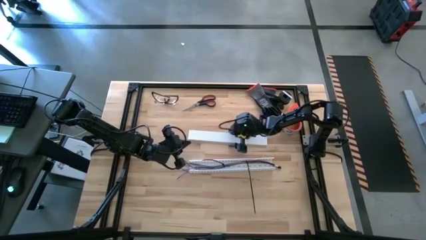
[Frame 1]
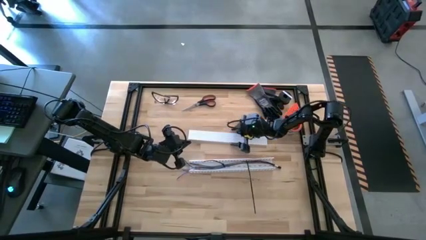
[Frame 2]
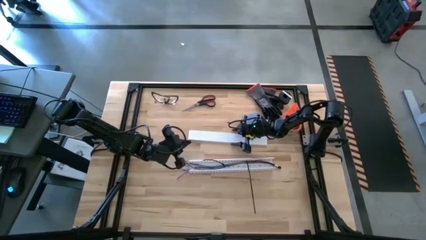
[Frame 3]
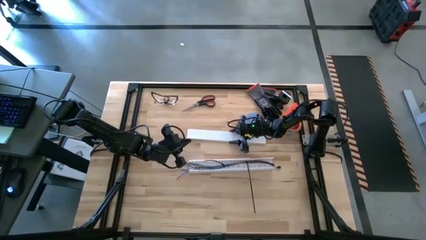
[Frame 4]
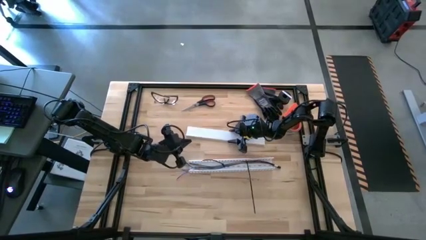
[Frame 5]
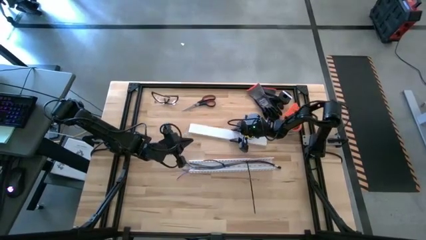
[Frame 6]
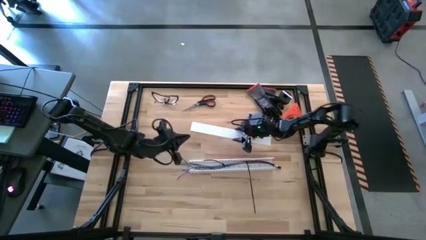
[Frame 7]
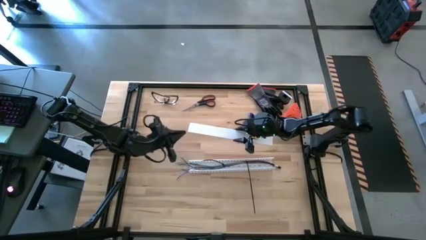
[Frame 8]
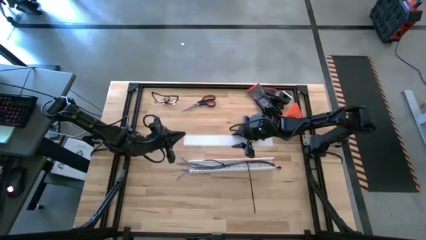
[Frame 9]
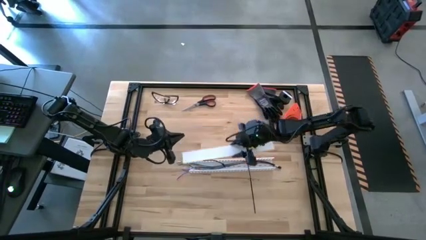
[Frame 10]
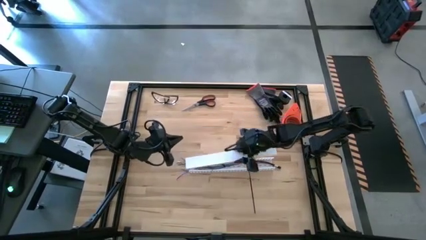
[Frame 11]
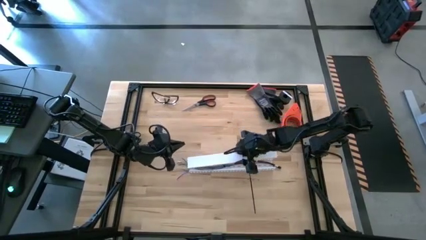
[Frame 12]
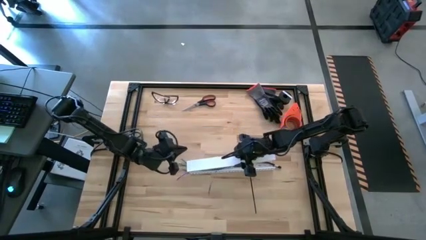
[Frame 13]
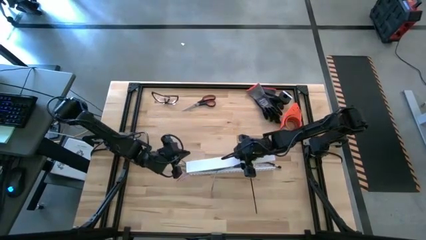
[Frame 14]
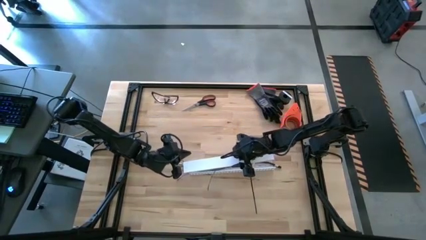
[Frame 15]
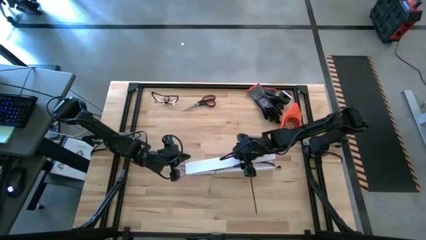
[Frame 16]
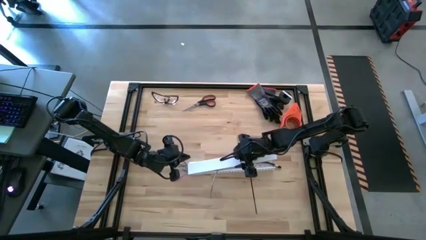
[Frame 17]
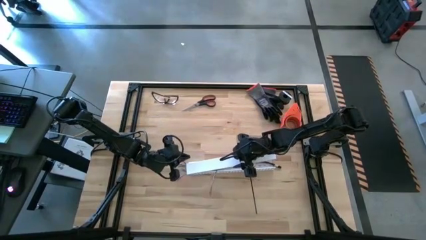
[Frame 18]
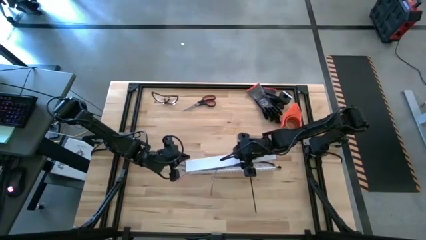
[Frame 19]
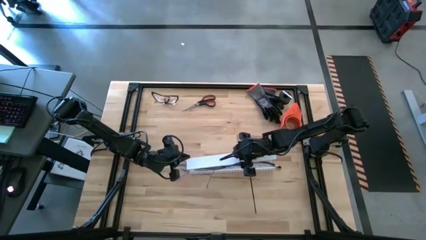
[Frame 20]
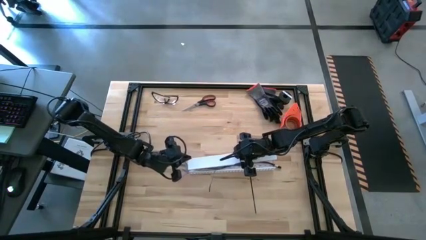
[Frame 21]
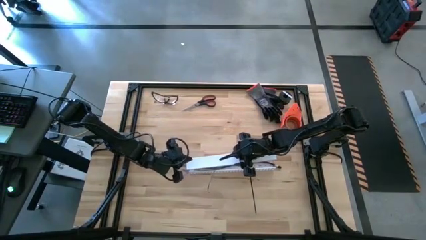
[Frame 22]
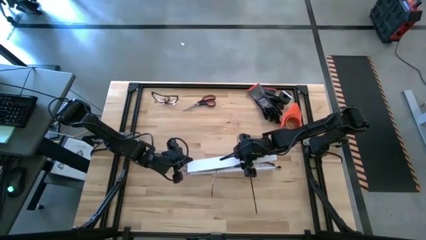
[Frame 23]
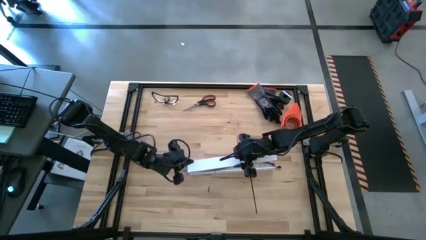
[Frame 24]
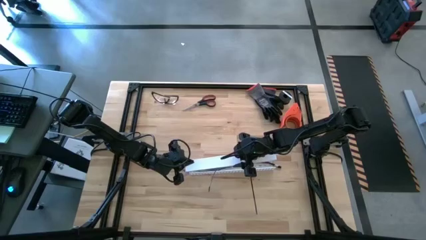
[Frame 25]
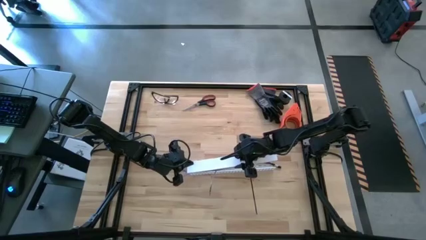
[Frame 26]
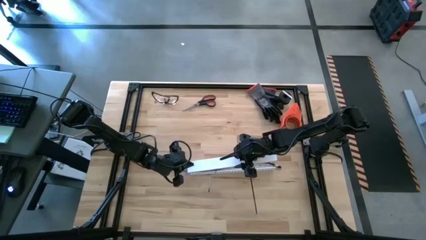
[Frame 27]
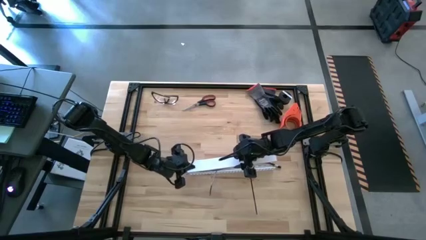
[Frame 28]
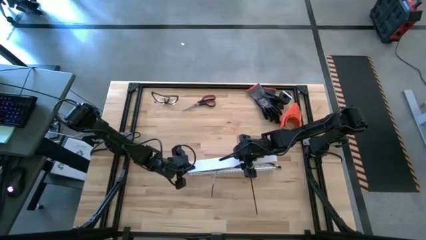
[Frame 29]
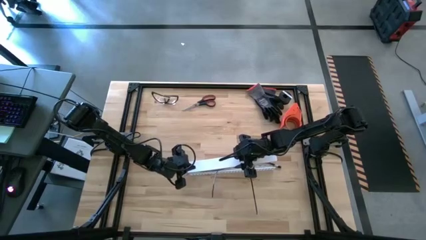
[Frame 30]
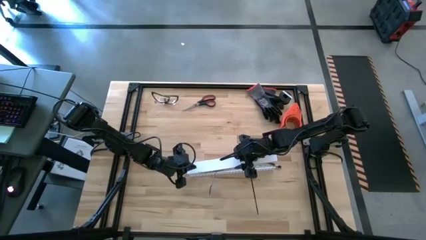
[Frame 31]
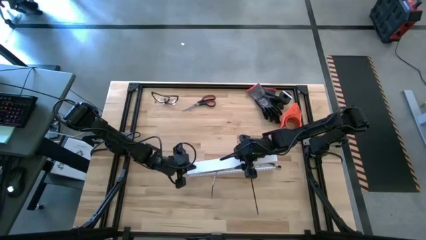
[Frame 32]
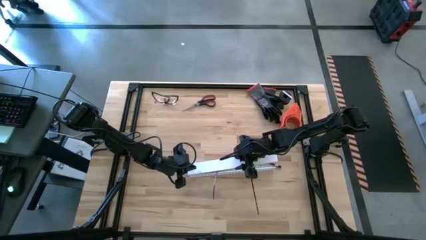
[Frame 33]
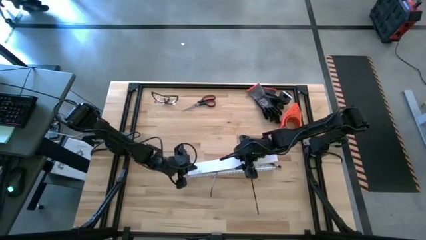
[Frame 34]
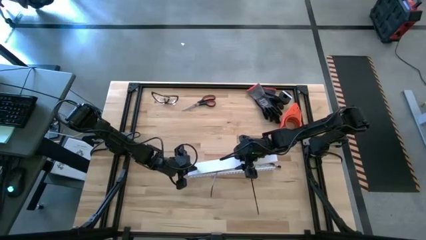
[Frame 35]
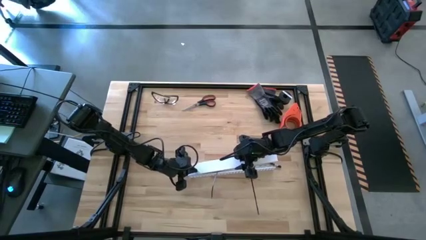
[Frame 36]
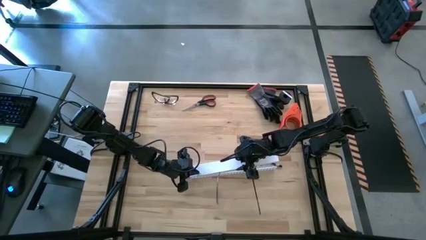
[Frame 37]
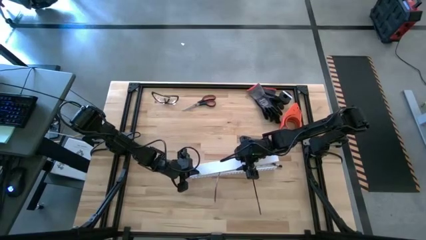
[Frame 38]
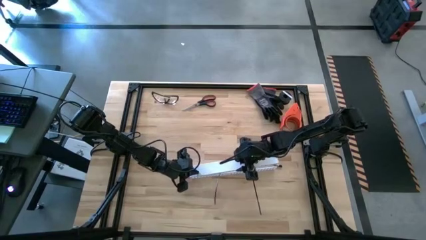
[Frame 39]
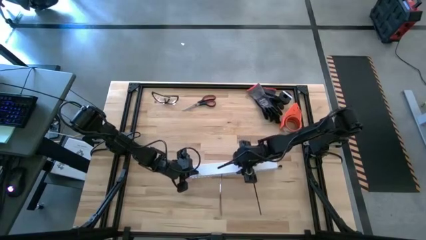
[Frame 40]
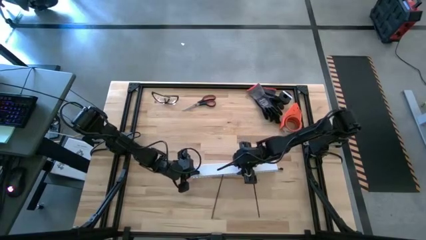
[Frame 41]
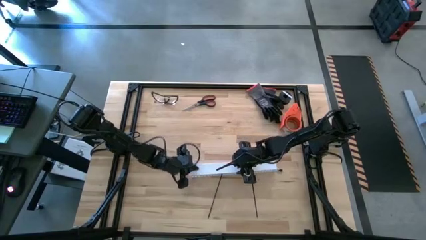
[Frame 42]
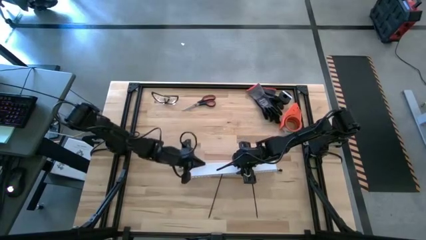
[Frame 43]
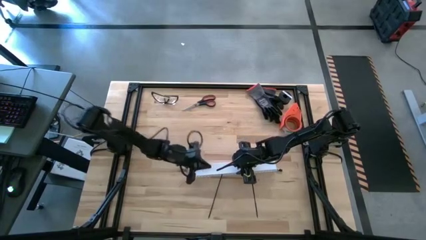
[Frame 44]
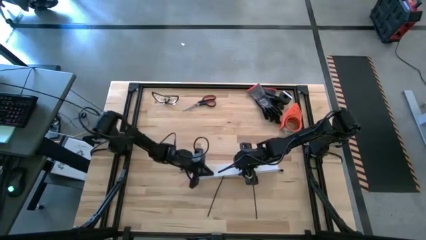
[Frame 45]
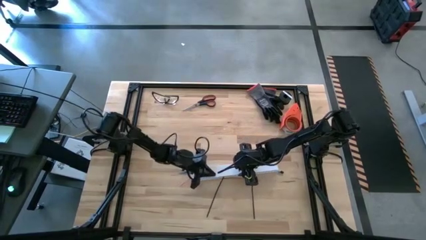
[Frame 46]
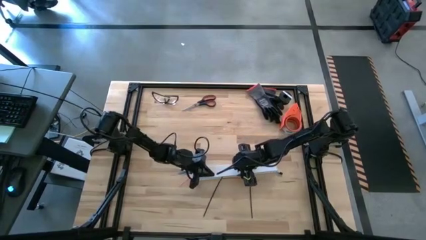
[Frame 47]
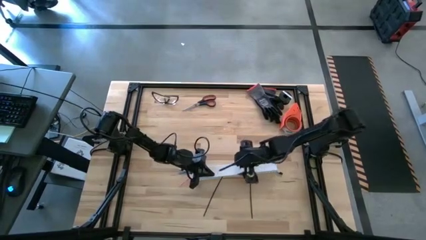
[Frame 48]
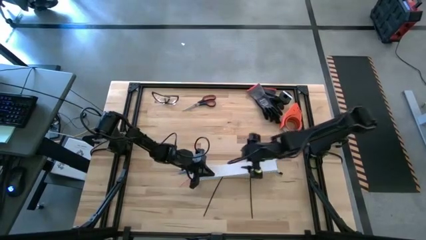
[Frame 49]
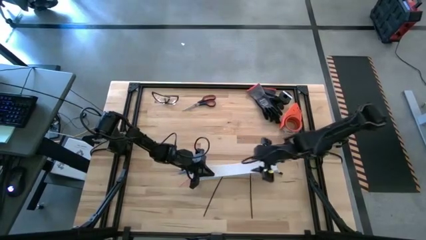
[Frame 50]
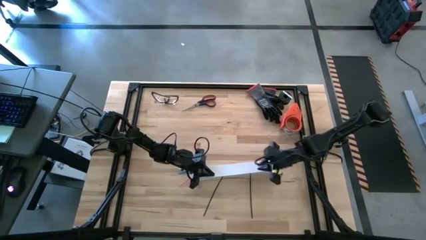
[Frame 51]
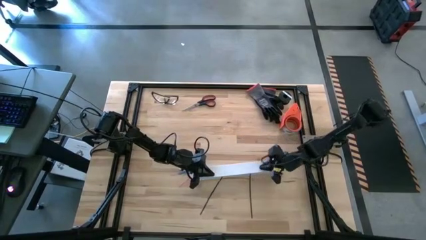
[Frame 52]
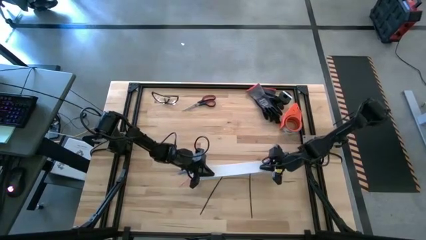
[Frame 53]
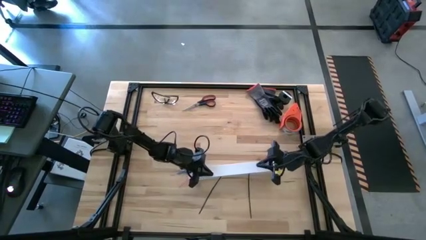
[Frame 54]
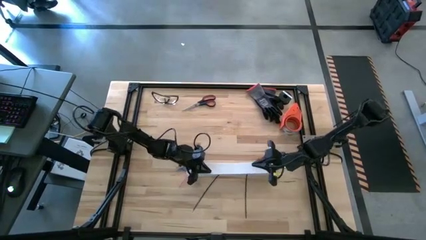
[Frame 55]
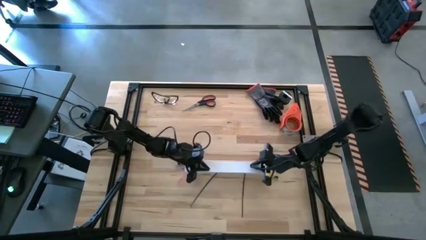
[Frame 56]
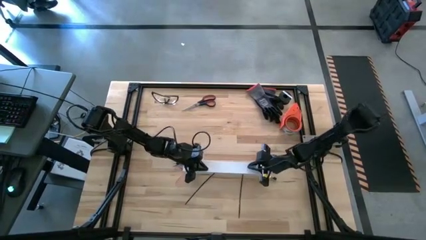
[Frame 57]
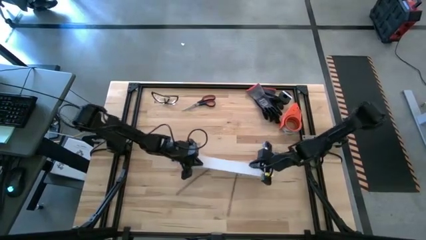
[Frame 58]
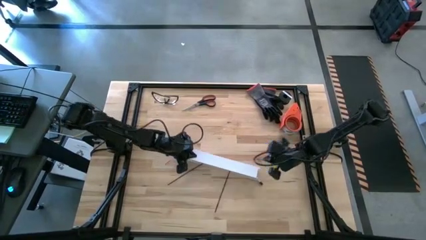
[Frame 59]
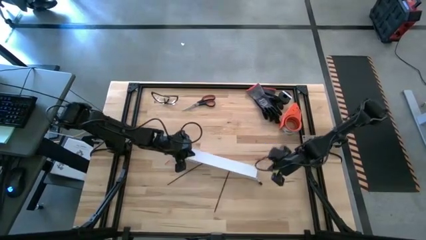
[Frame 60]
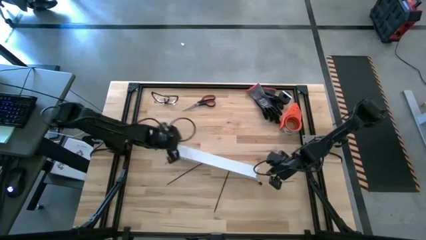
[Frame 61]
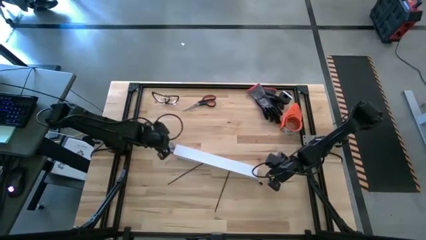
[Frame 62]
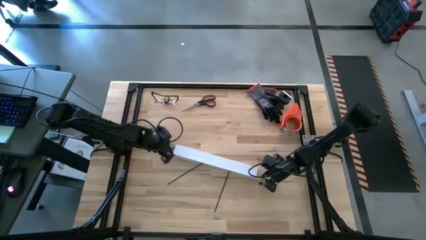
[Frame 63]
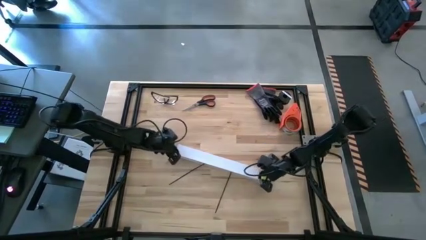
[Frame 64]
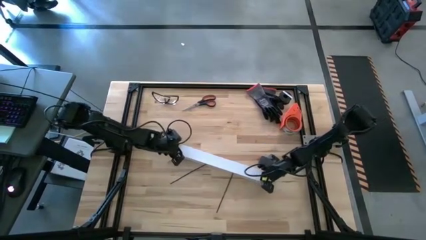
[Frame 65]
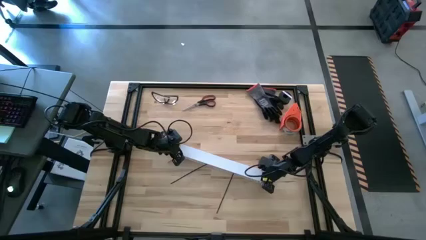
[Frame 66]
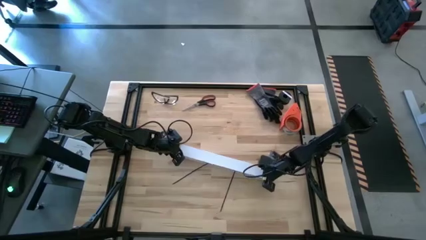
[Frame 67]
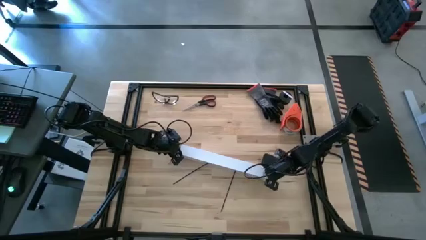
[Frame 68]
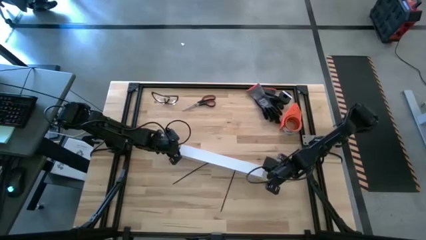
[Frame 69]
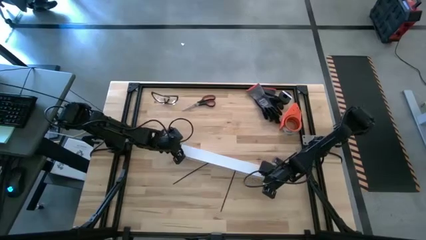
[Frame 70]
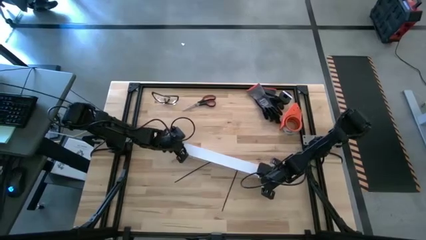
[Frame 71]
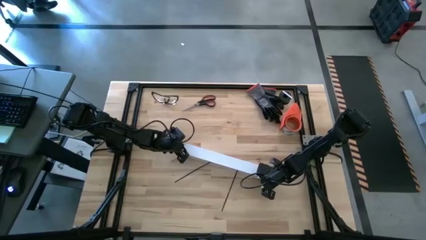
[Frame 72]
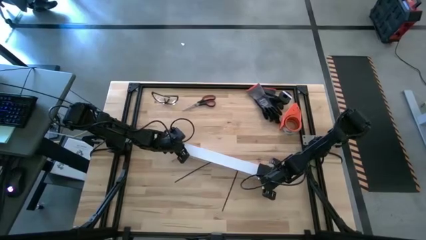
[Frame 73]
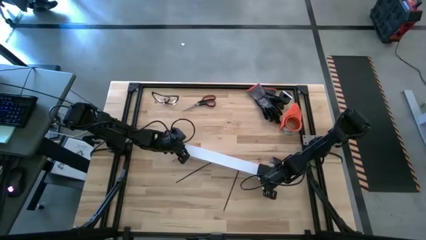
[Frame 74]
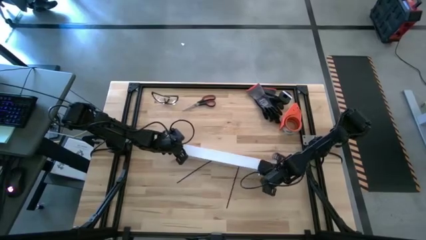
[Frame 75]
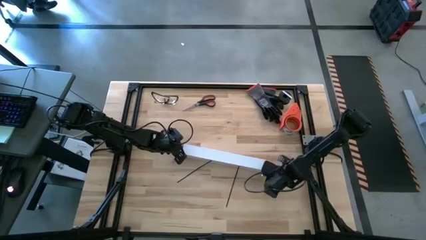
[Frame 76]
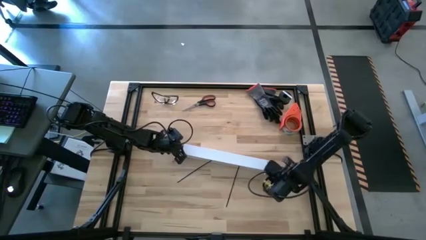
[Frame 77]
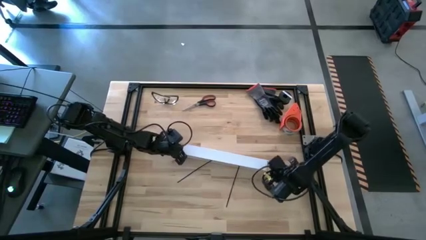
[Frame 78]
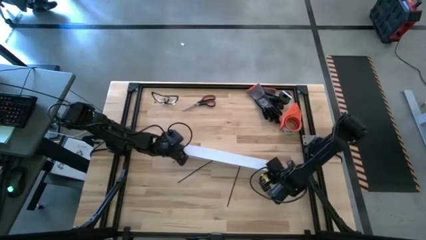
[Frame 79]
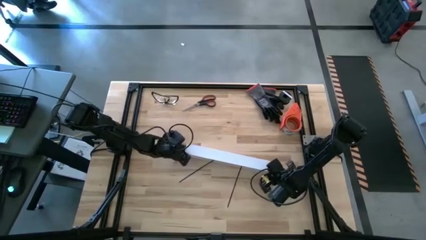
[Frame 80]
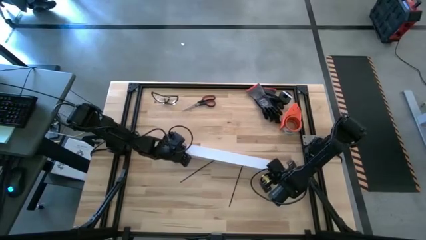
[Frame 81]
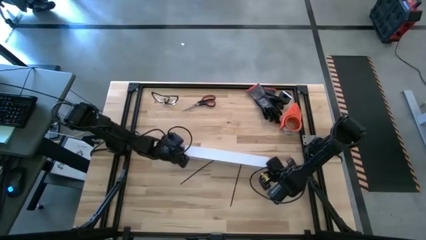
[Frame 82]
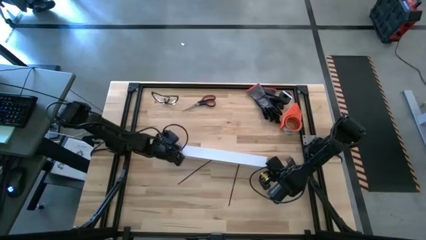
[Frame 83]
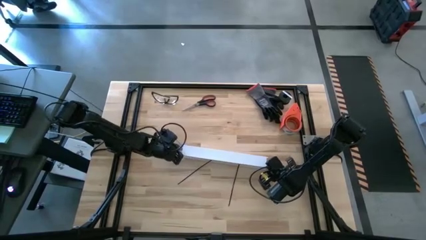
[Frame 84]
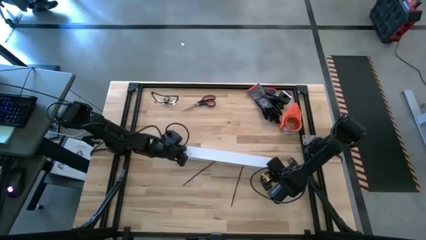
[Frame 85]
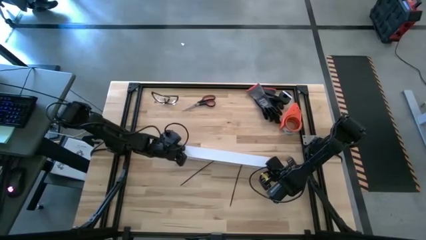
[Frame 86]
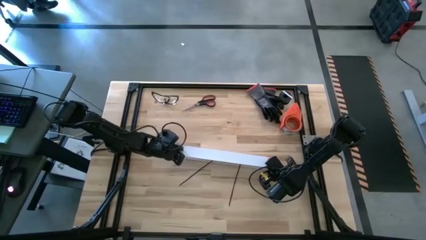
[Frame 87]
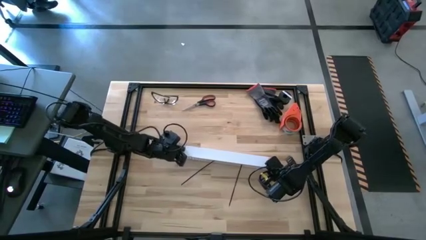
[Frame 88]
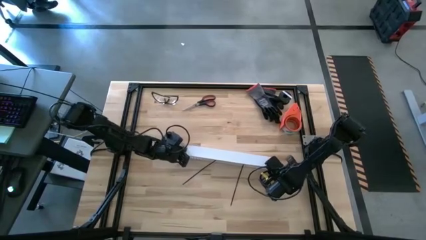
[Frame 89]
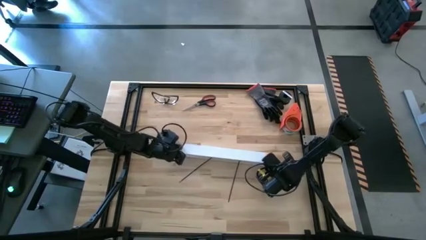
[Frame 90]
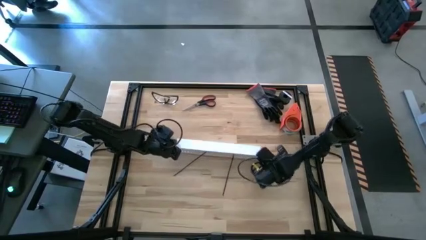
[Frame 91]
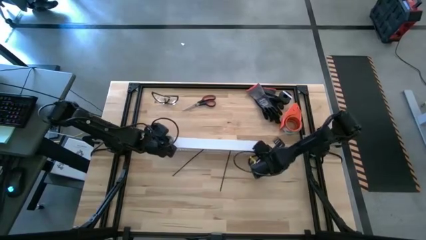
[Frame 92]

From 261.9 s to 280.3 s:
Task: Ziptie cables
Close the white cable duct
